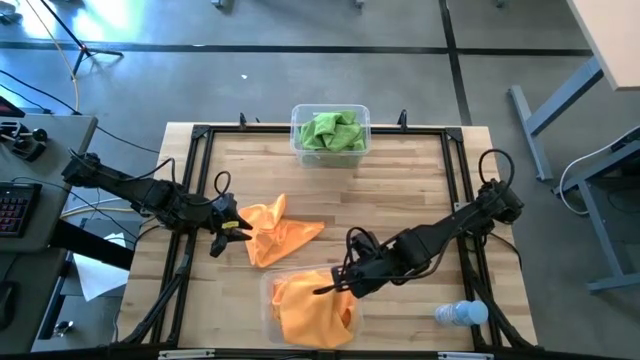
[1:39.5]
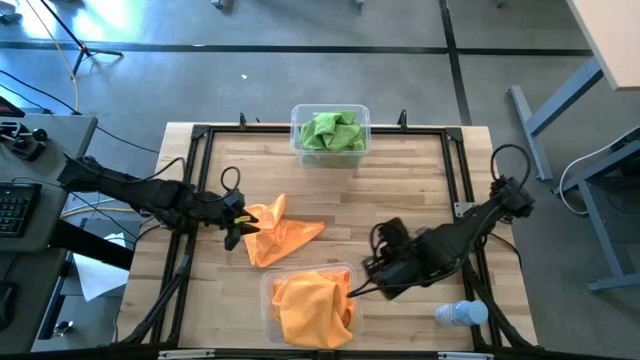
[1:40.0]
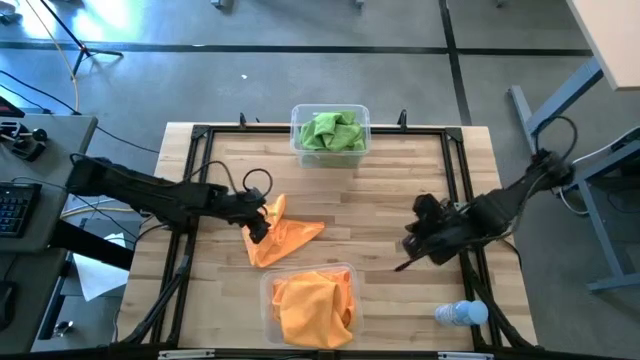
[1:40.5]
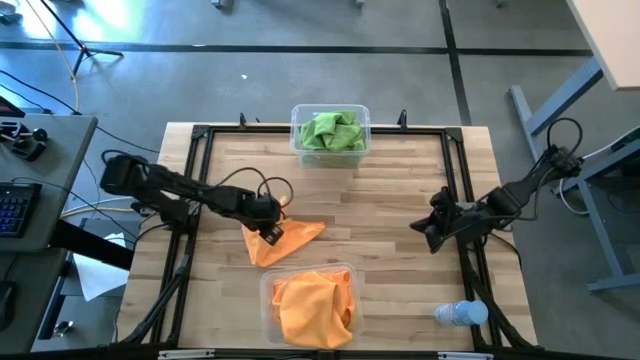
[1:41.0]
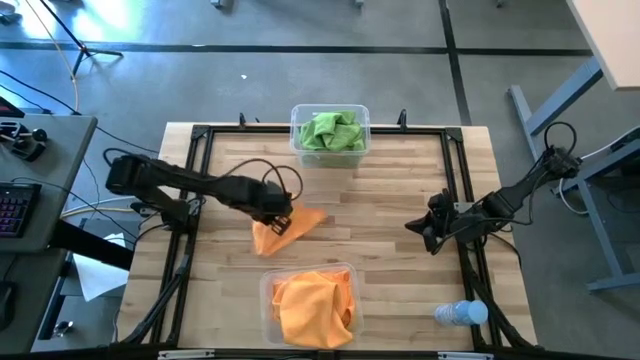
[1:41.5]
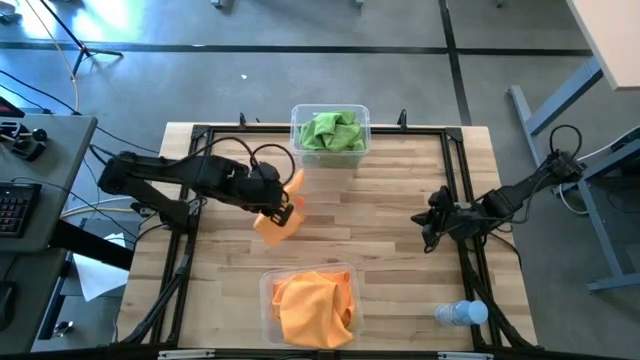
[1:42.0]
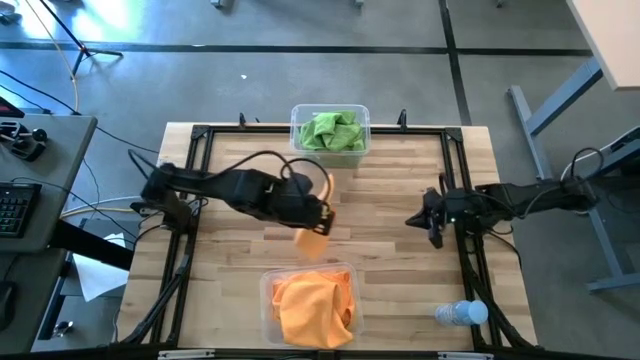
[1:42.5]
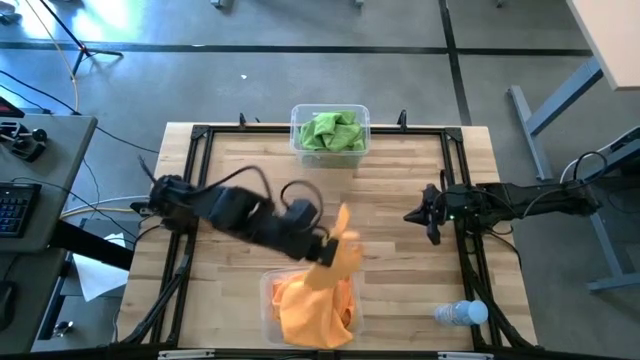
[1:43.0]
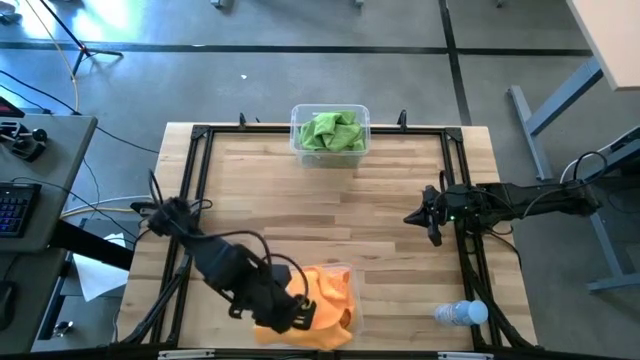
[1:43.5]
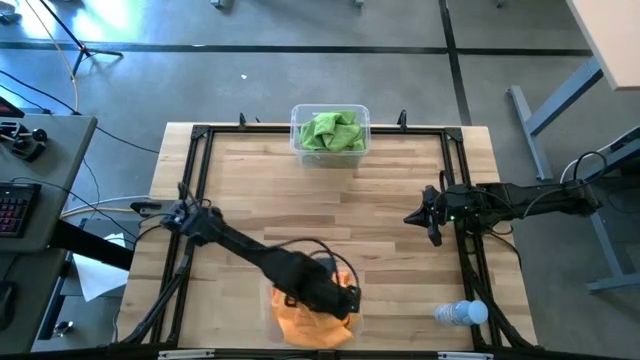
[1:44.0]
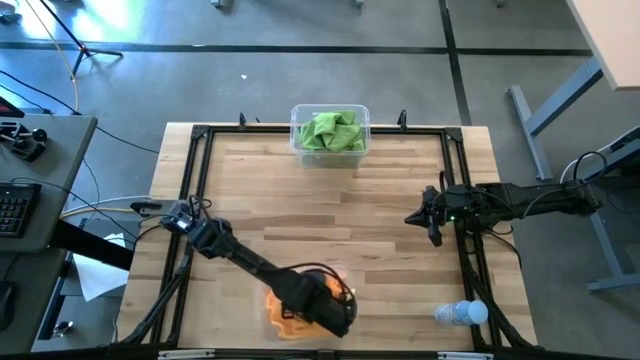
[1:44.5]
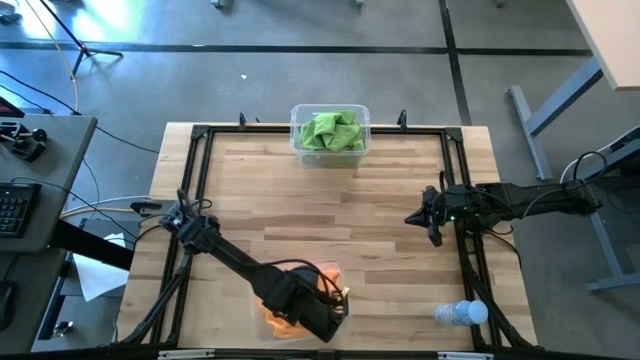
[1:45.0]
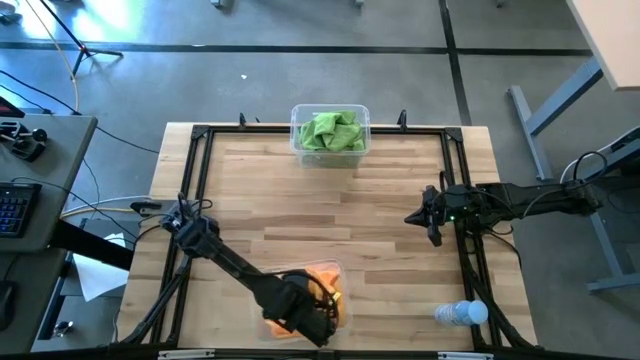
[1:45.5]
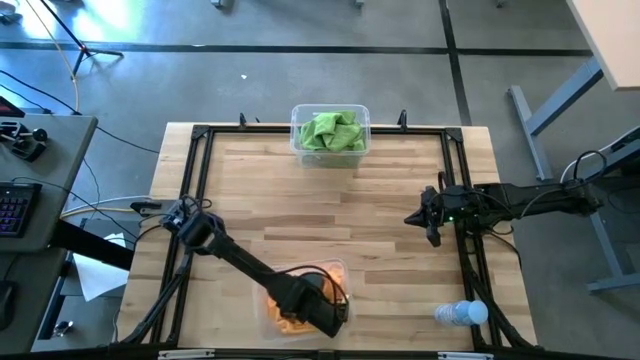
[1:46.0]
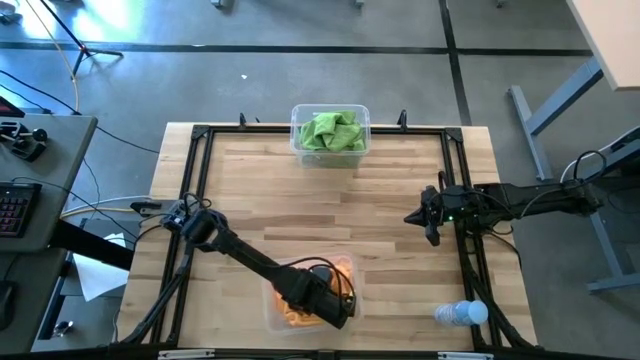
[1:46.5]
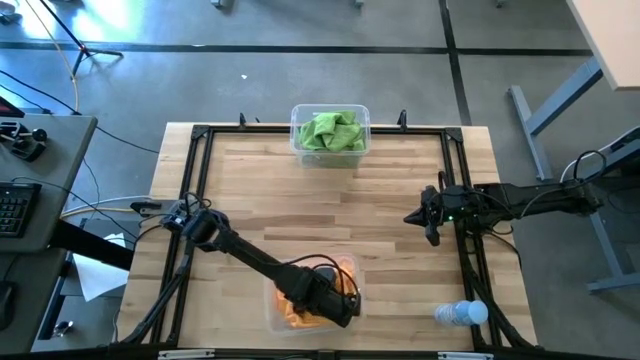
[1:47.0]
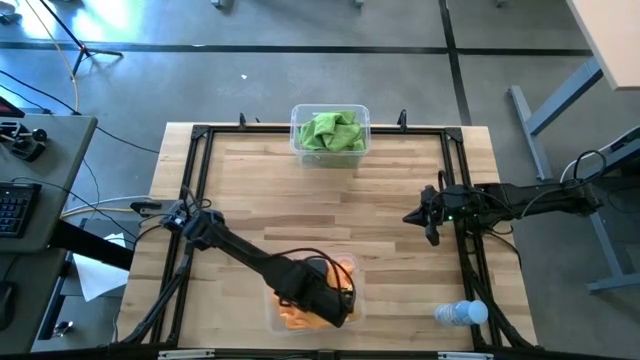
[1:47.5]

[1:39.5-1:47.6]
Task: Sort microfiber towel by color & place in baskets
Put the yellow towel into the bottom transparent bin

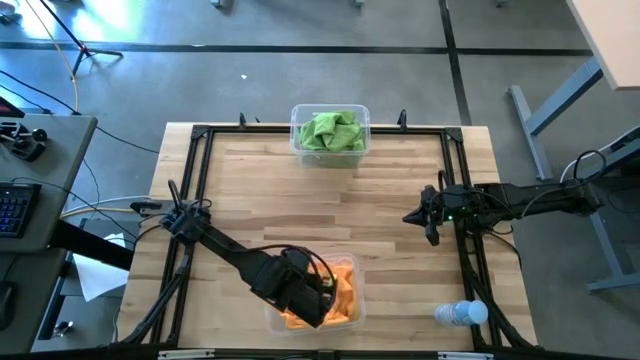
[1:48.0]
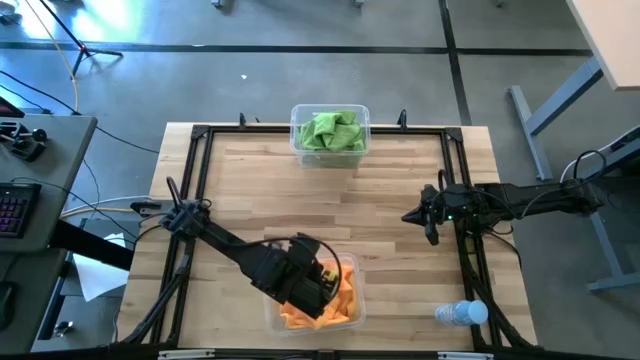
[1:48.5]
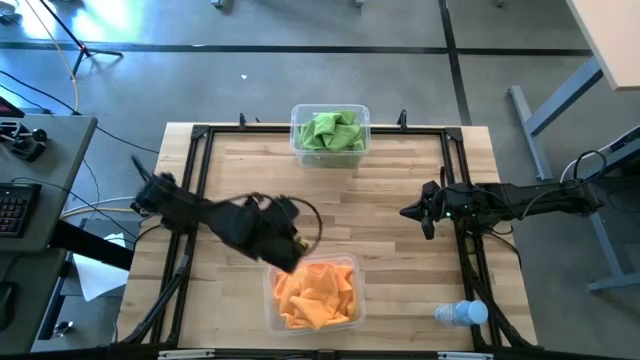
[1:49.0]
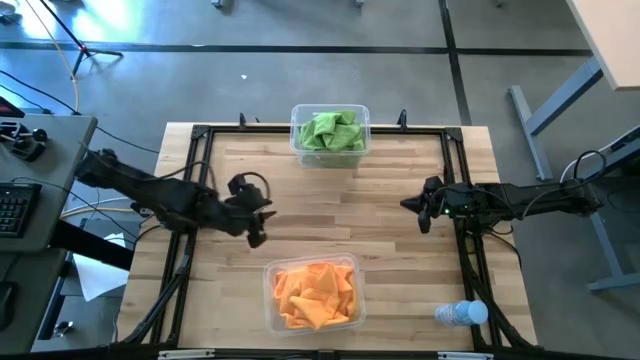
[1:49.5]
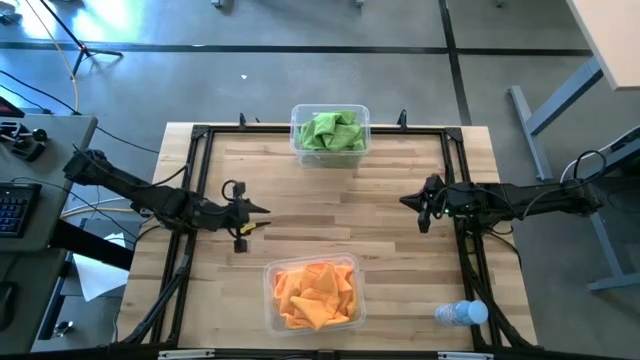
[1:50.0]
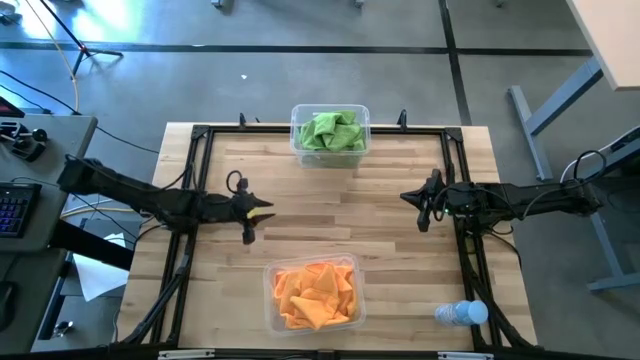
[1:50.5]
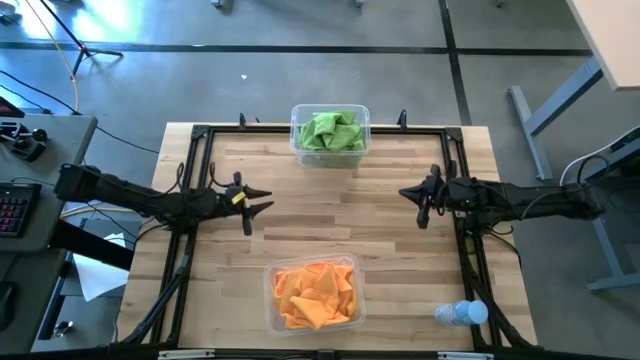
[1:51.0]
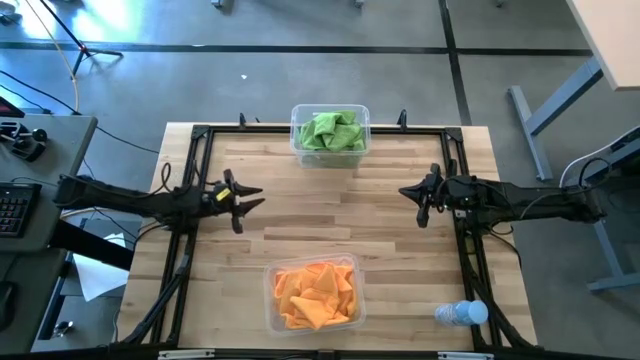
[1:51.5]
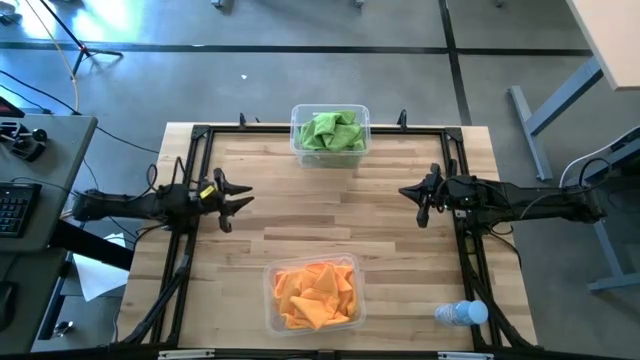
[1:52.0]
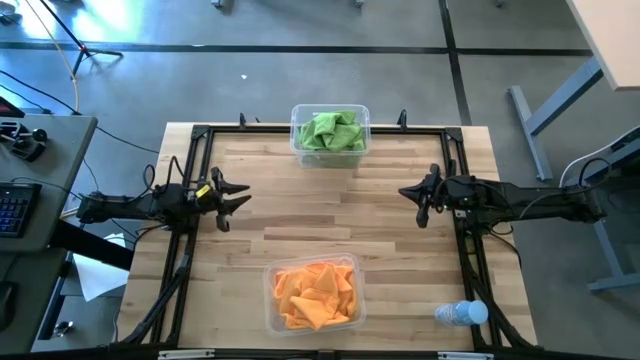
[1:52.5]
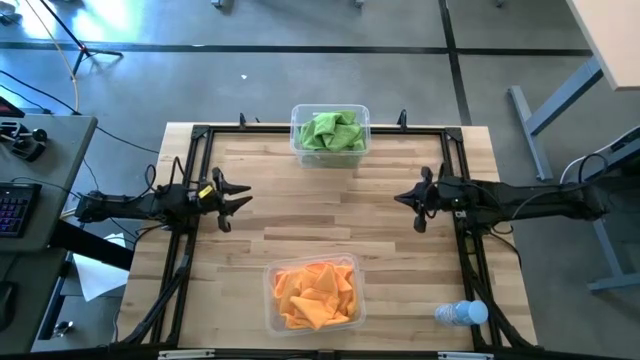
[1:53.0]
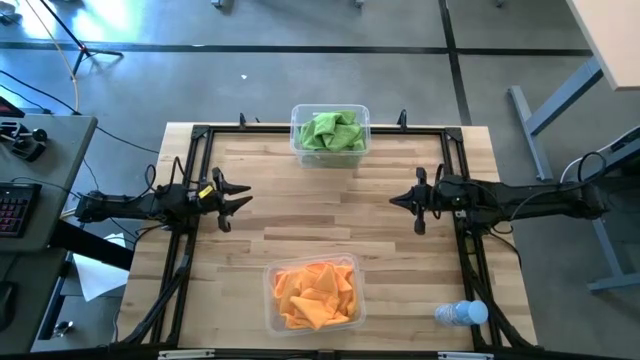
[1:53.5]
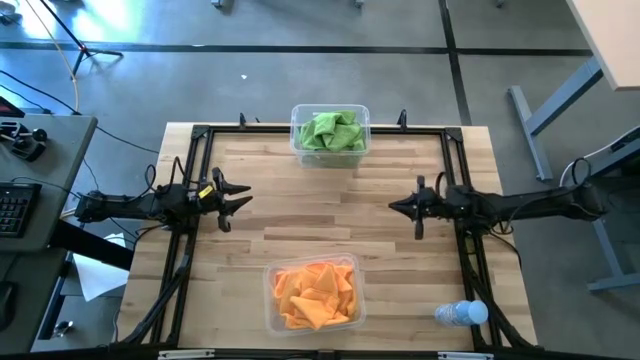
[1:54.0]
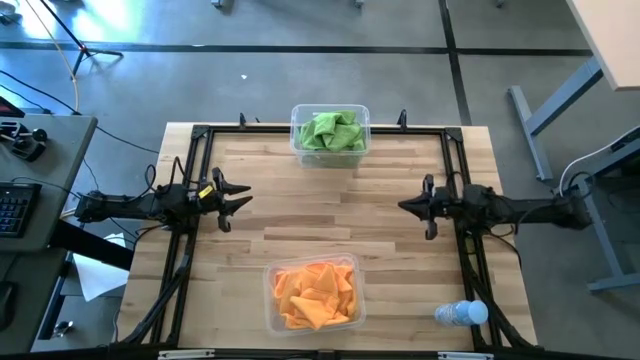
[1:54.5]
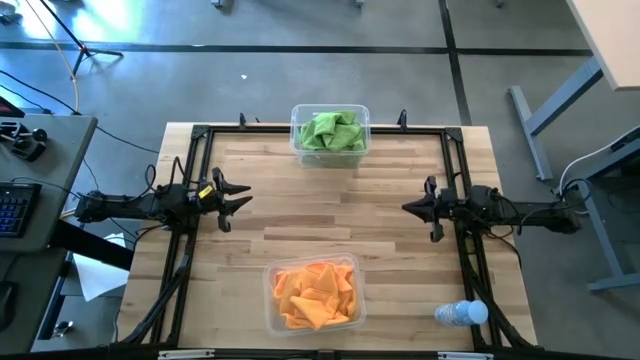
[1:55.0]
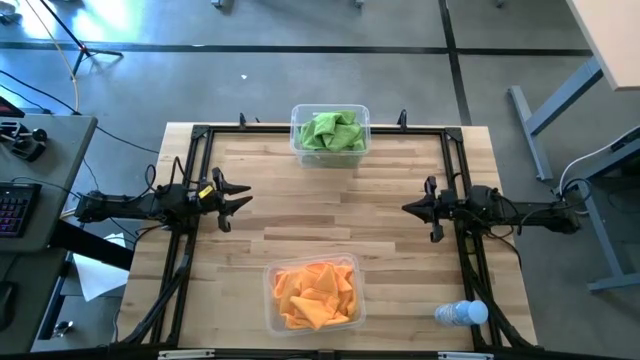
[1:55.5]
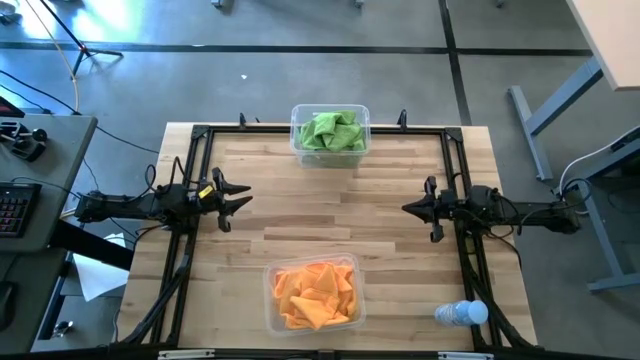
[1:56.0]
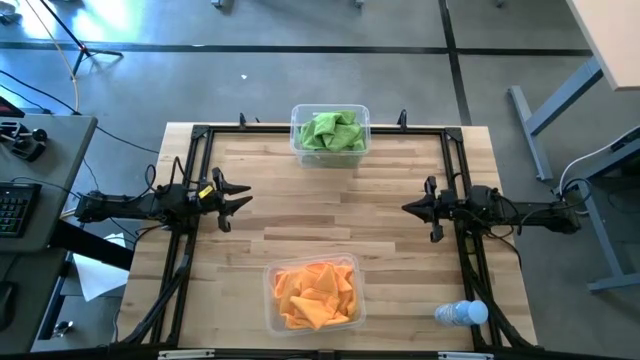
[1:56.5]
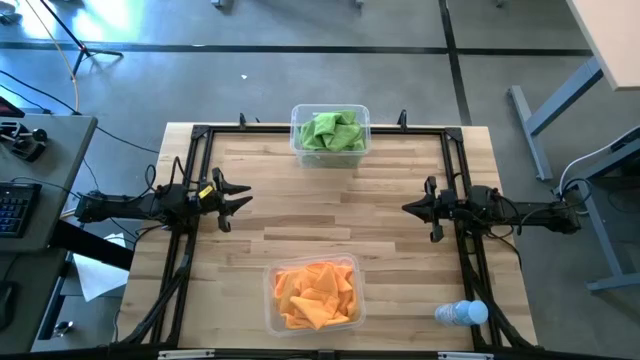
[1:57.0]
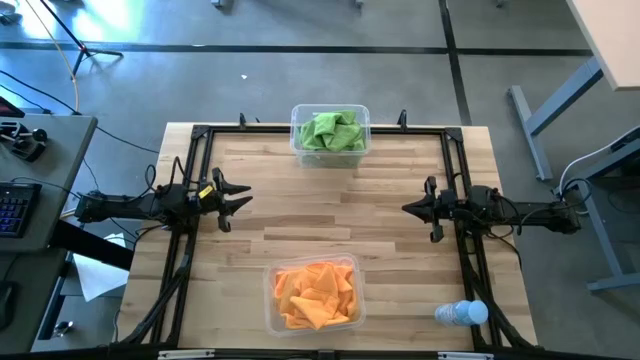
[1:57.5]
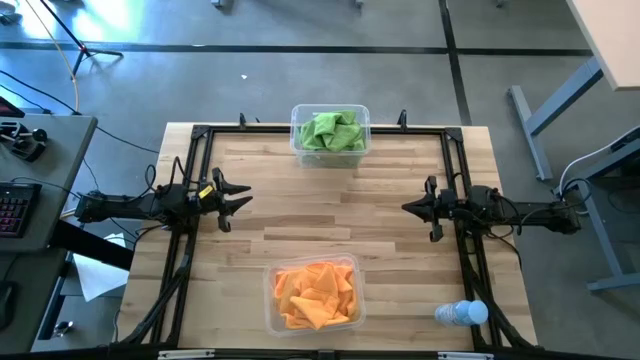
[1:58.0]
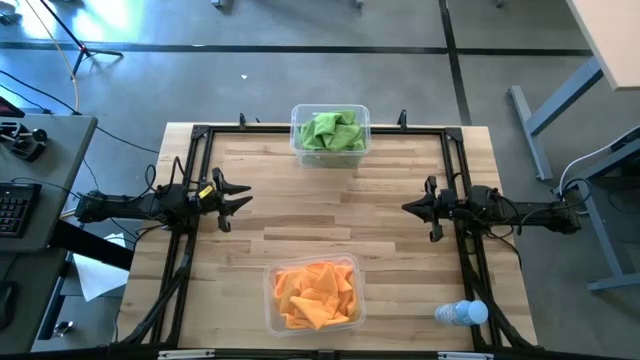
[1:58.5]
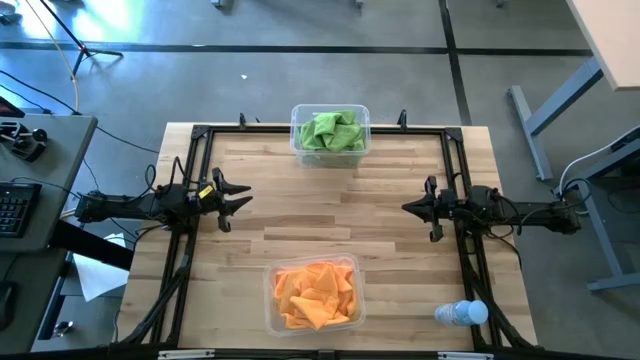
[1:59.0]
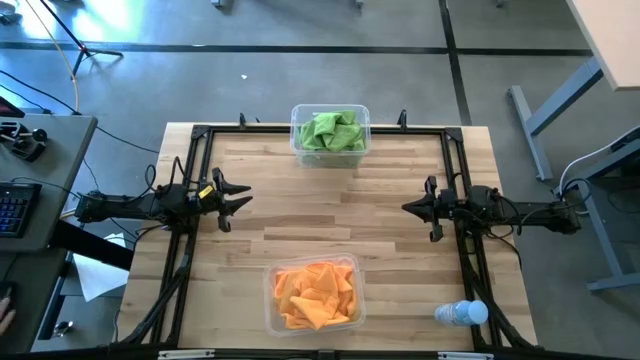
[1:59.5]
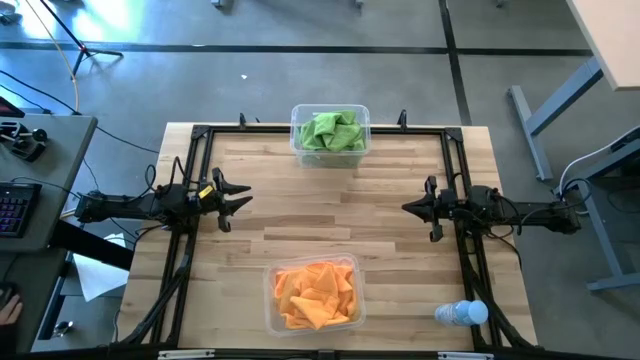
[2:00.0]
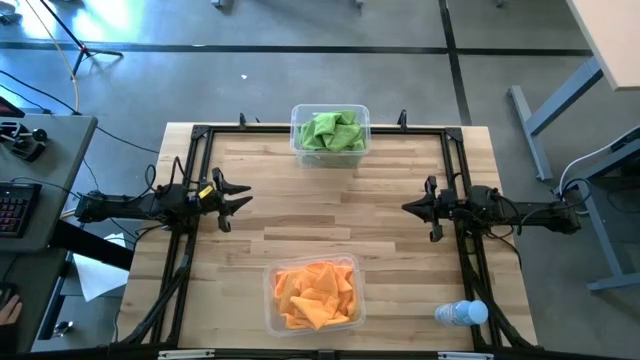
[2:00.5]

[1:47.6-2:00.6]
Return to Home Position
